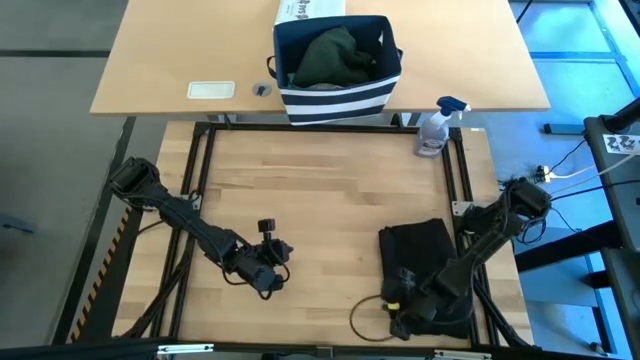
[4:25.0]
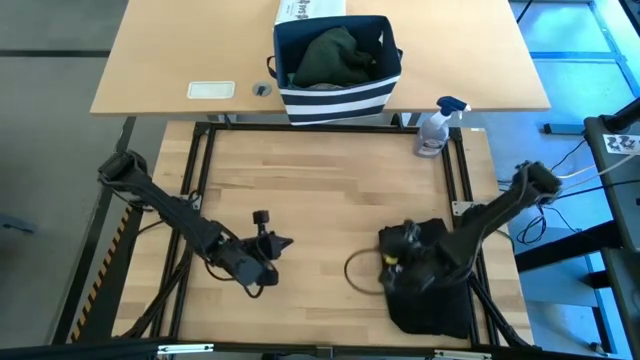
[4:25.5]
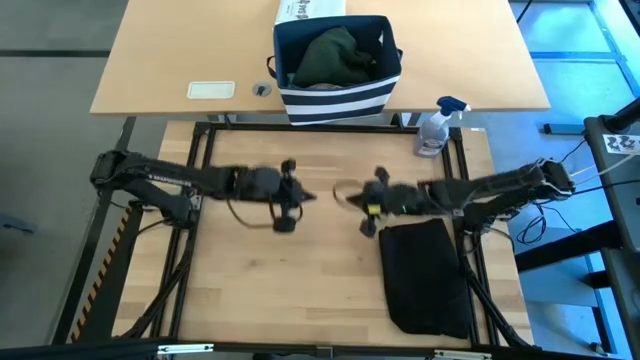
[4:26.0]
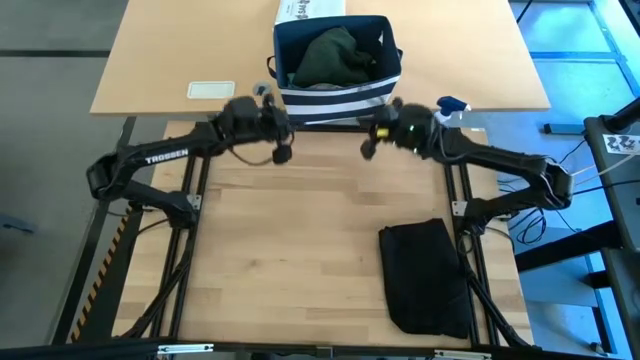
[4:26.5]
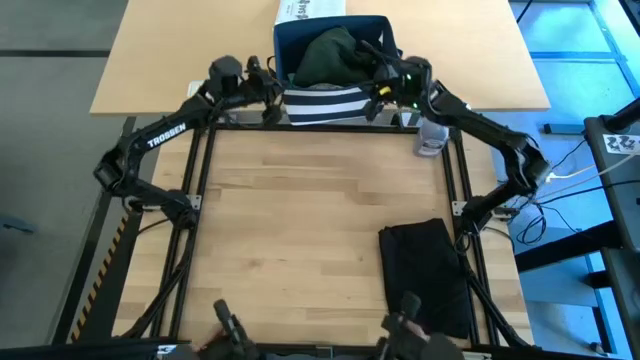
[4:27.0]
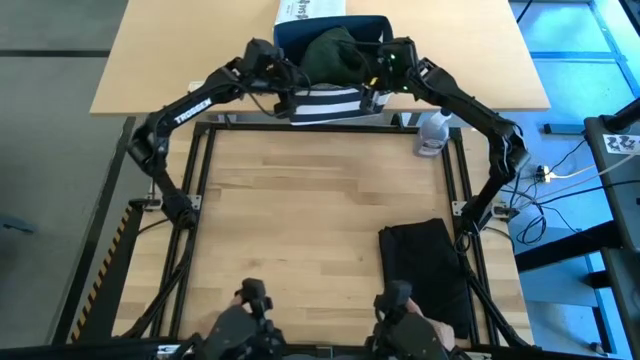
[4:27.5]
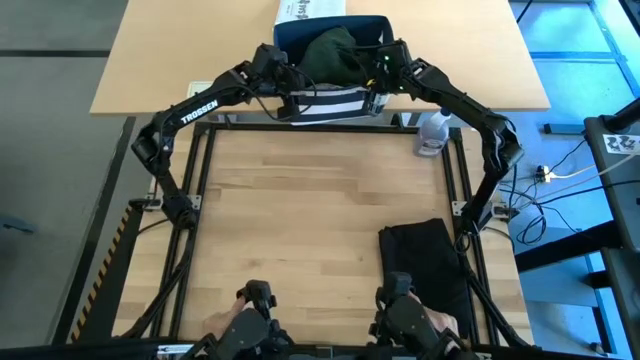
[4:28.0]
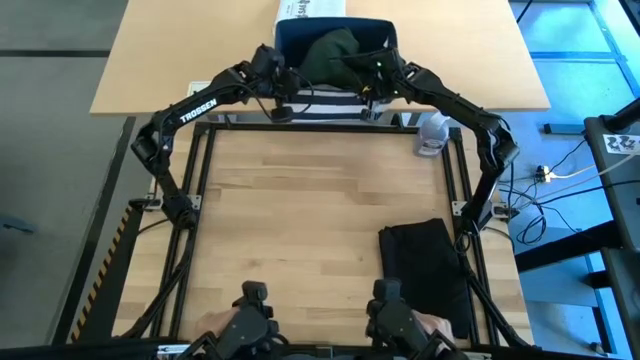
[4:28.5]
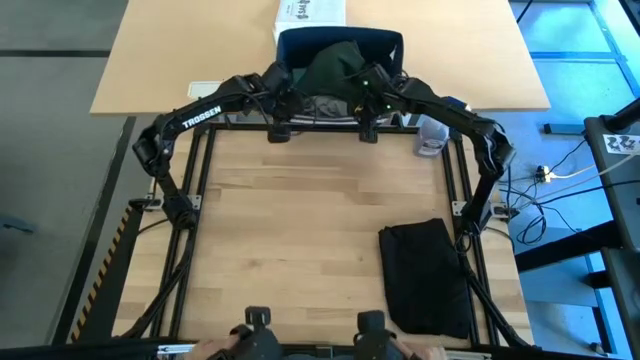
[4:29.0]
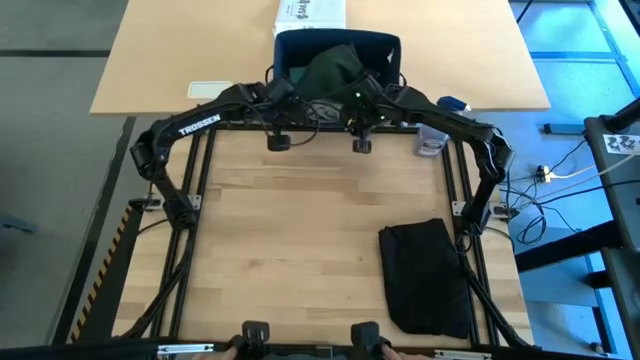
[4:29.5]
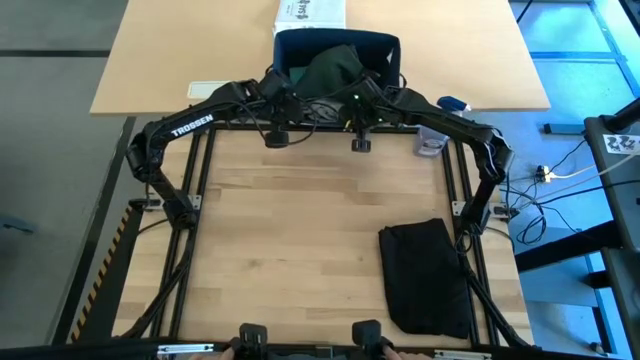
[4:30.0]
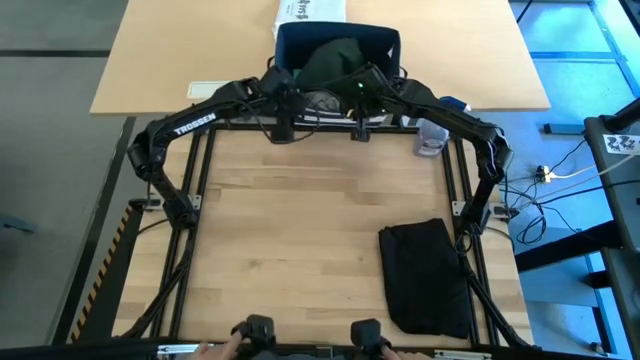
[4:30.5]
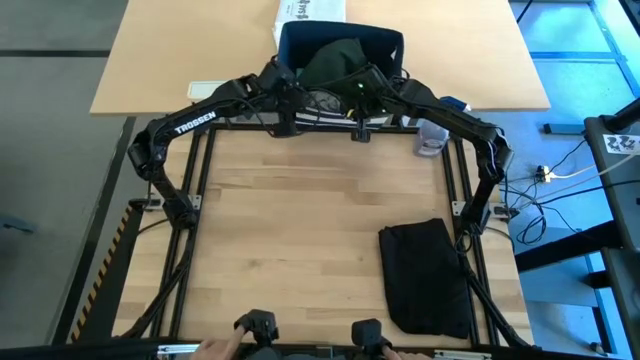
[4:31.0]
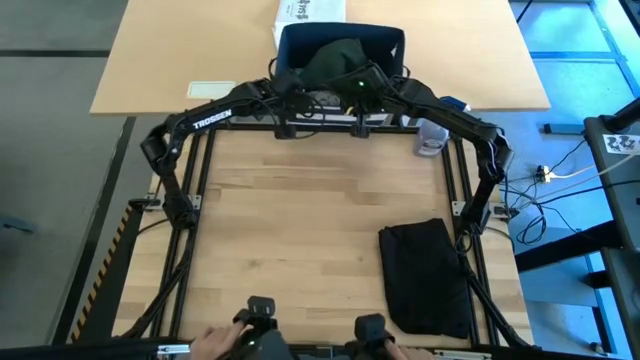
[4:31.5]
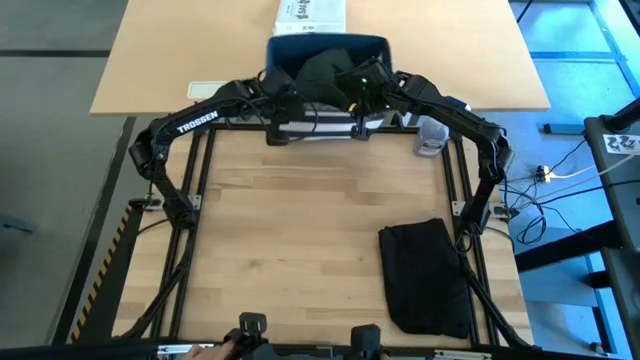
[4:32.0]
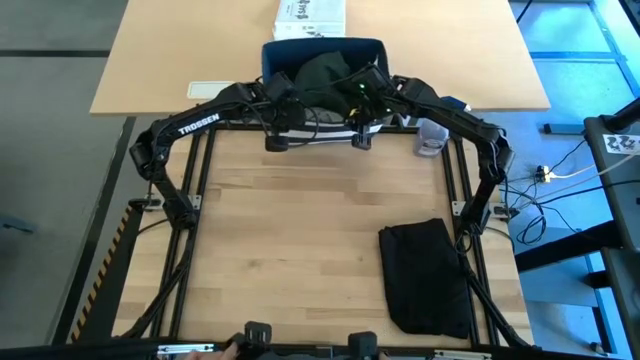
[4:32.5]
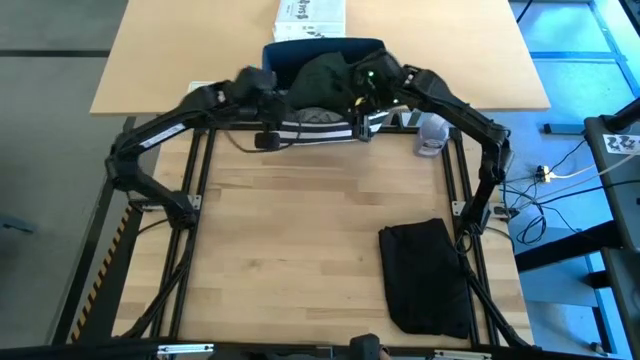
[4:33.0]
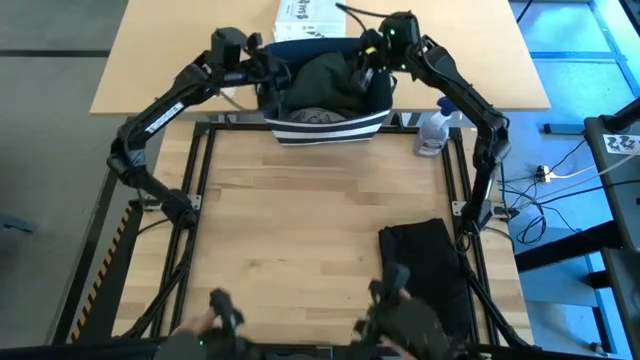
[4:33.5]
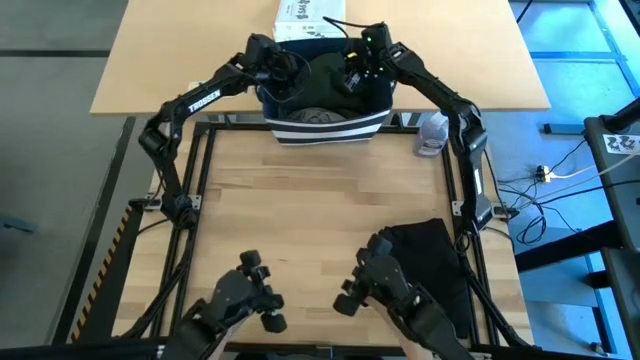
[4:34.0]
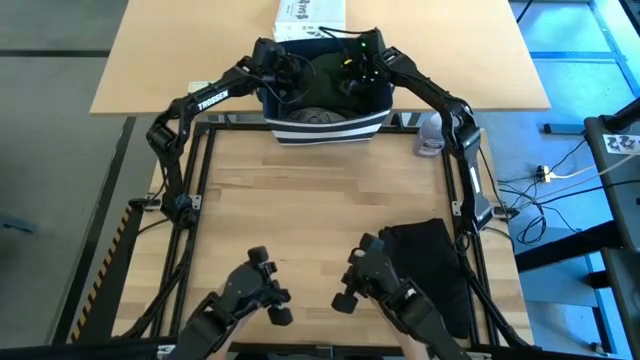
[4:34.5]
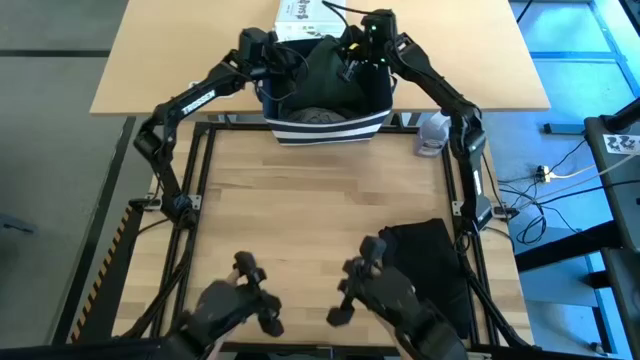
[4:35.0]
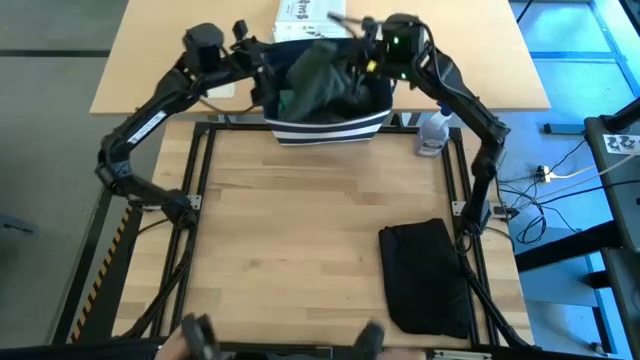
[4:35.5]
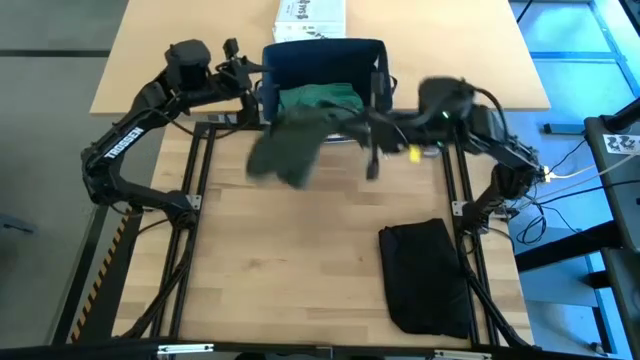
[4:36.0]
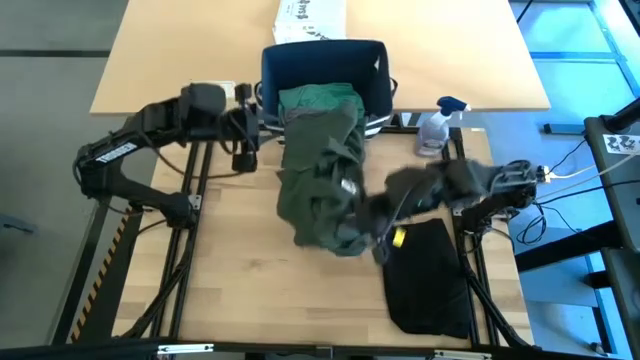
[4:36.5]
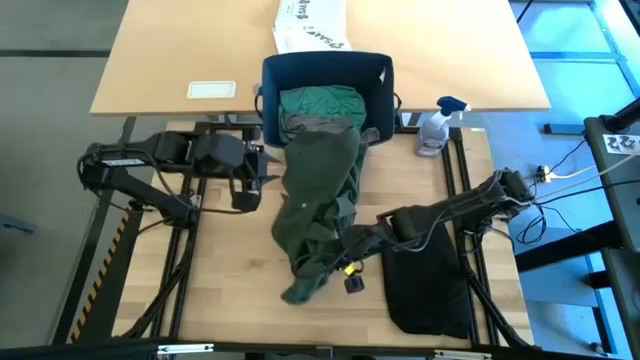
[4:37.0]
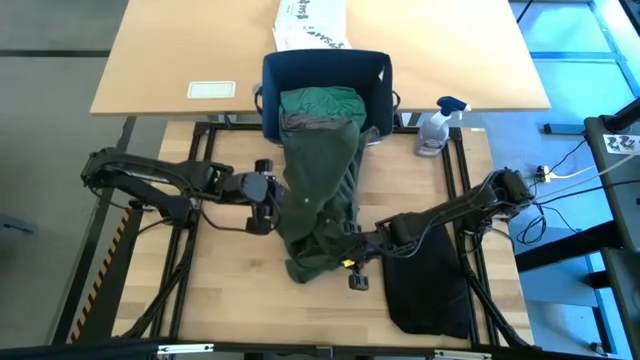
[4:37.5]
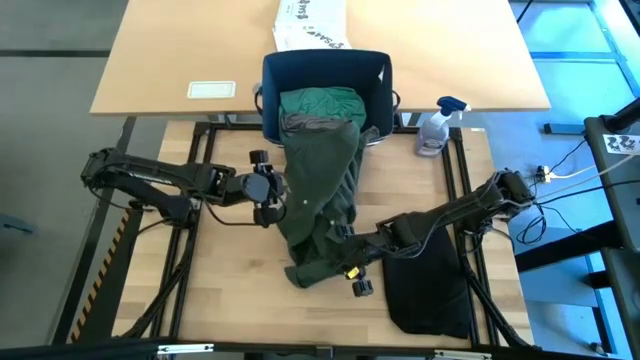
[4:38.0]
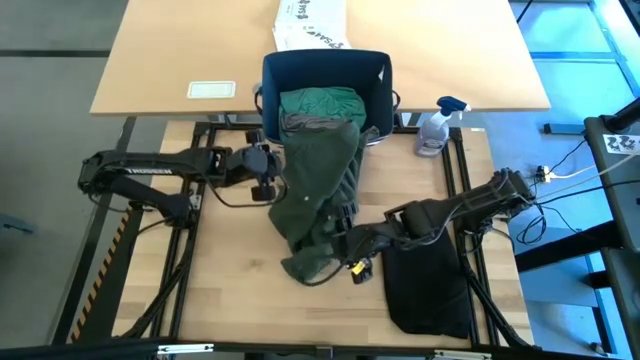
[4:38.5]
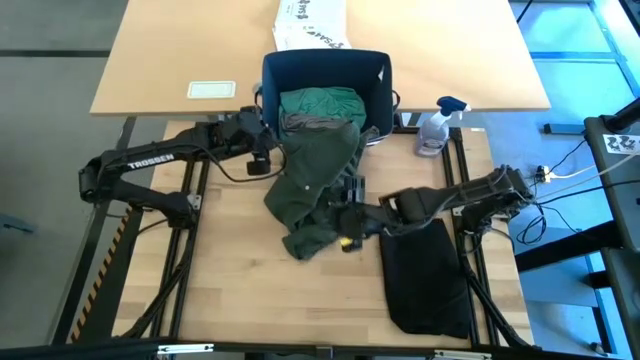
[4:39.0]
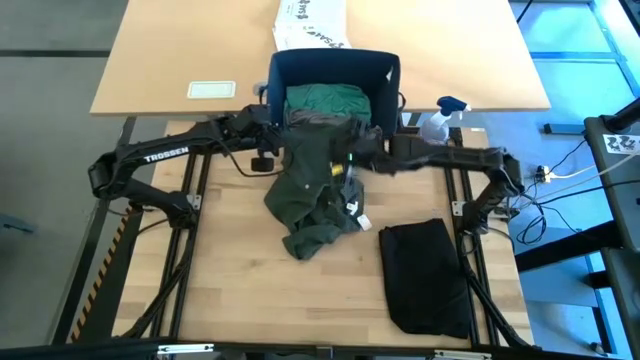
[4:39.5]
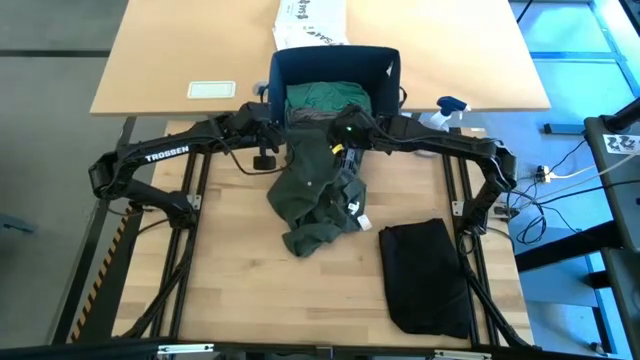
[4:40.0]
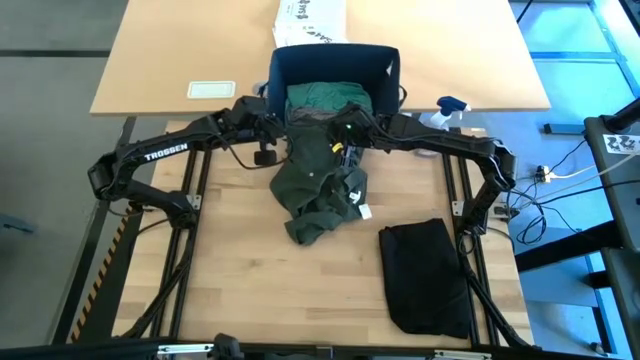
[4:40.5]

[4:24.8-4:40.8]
Task: Fold Laundry from Bin
Fold the green polo shirt

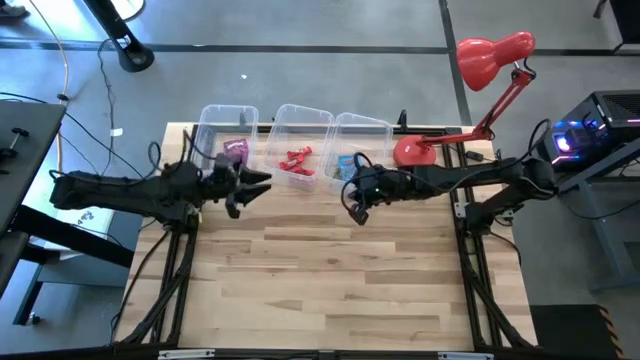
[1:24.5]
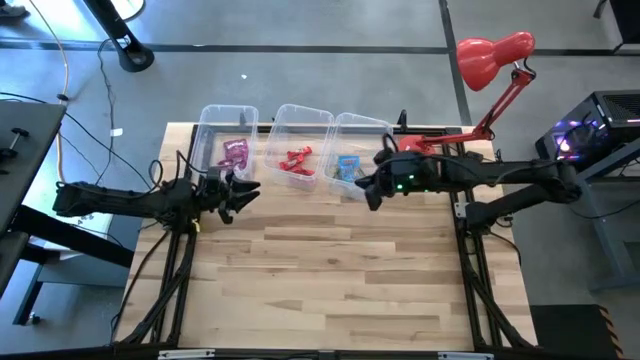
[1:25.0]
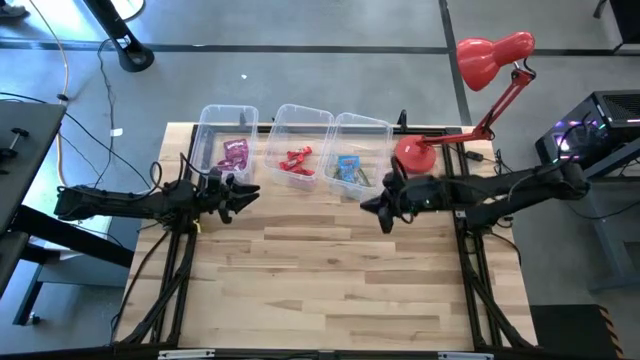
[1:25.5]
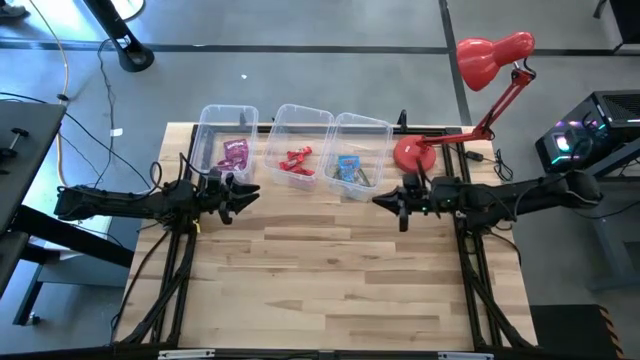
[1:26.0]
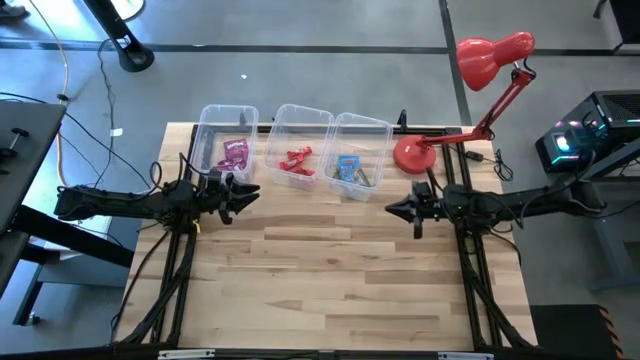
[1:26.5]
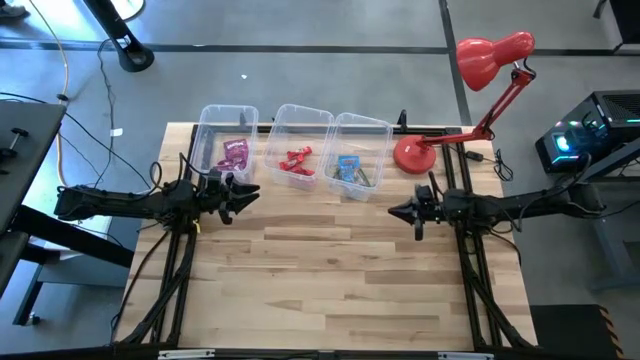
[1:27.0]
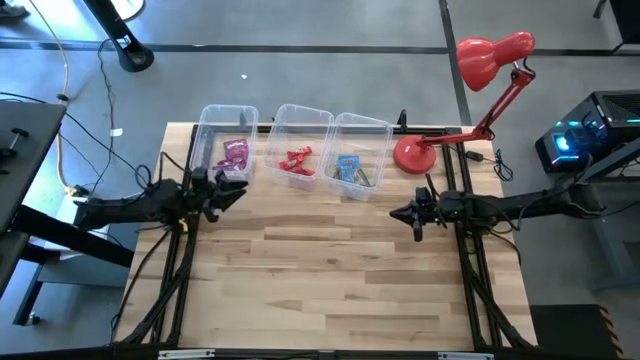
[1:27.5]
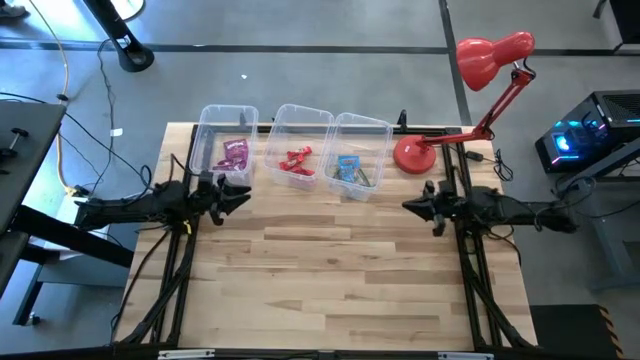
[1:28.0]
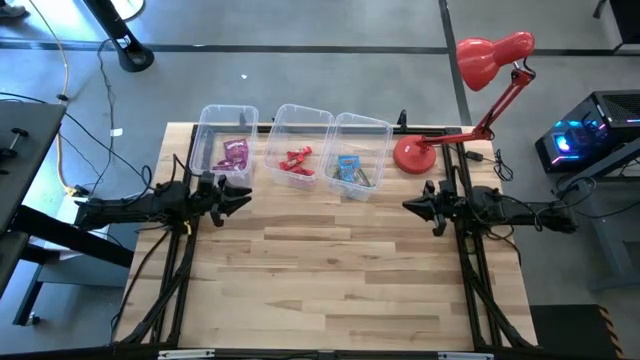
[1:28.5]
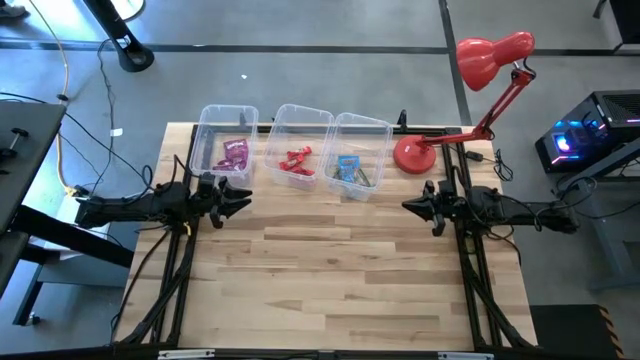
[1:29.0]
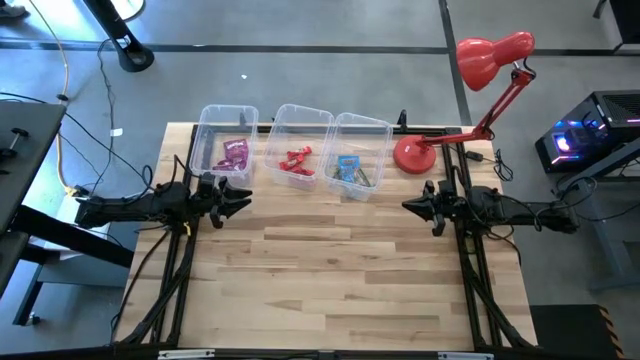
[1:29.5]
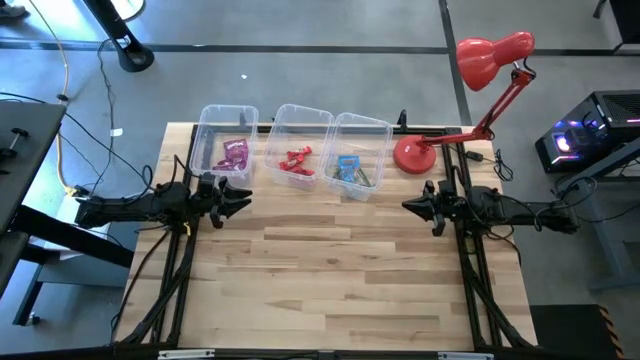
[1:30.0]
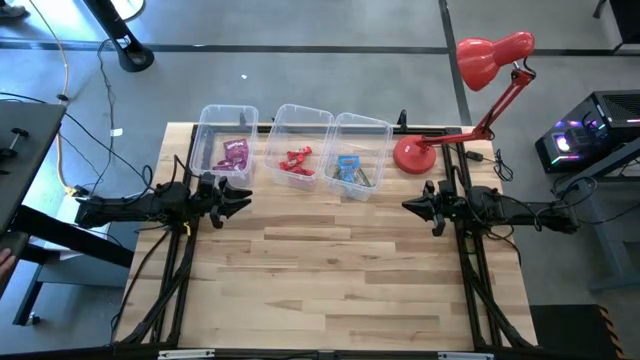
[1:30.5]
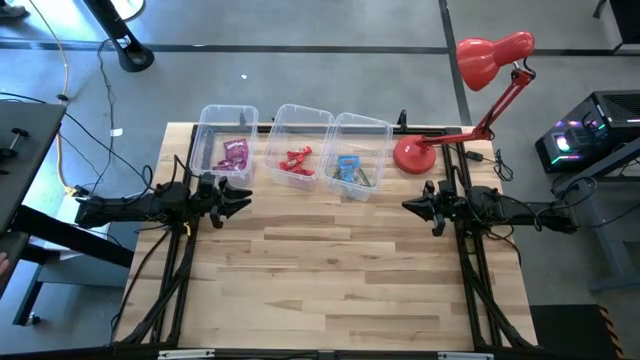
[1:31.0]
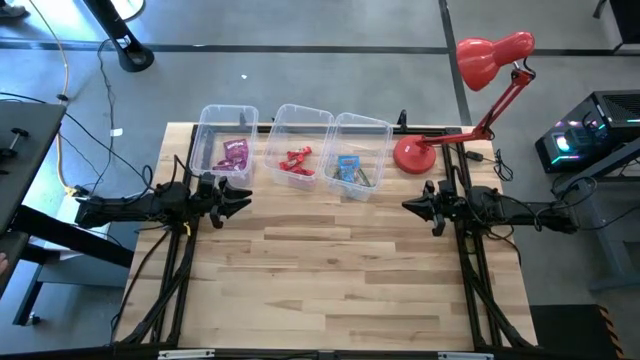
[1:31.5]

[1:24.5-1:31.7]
Task: Sort candy
Return to Home Position
